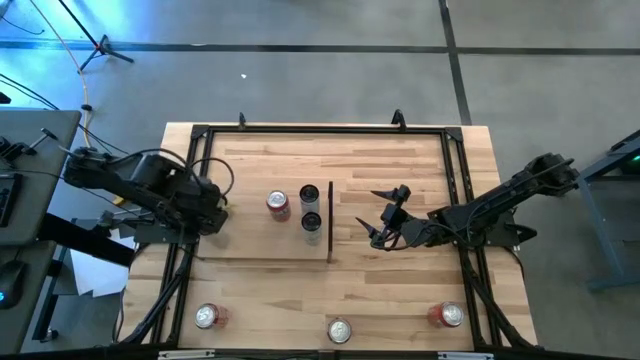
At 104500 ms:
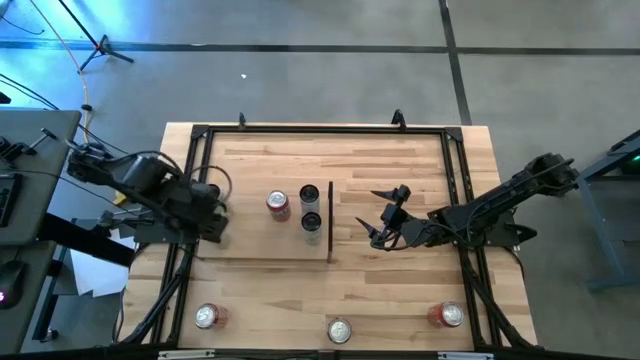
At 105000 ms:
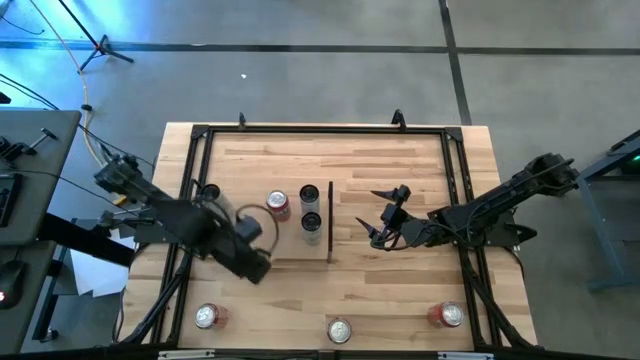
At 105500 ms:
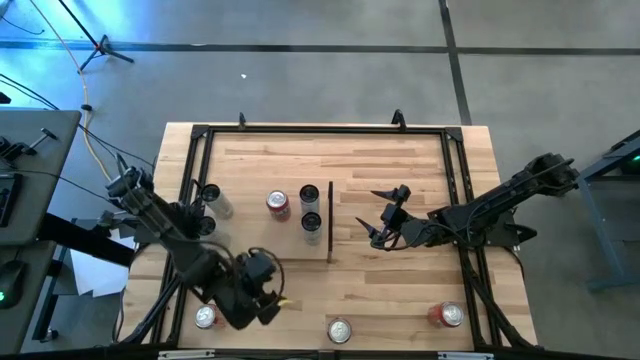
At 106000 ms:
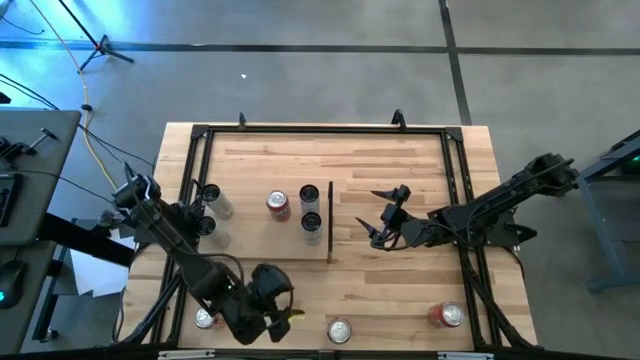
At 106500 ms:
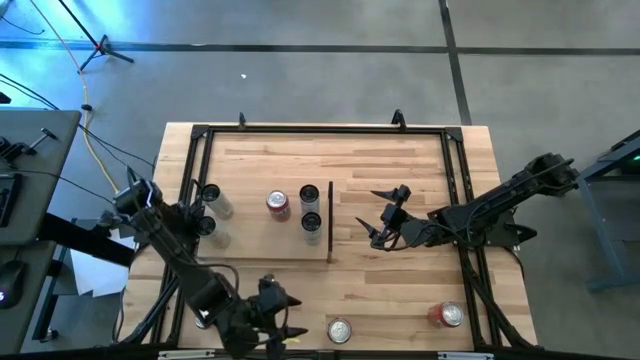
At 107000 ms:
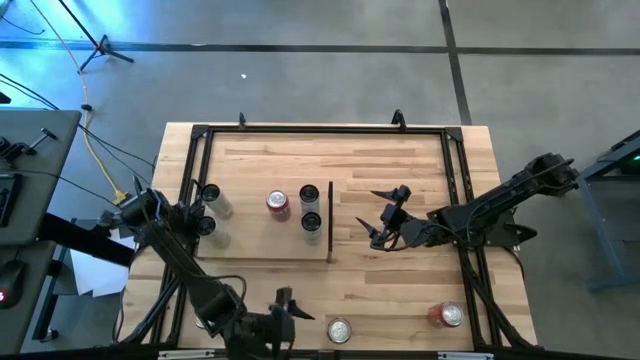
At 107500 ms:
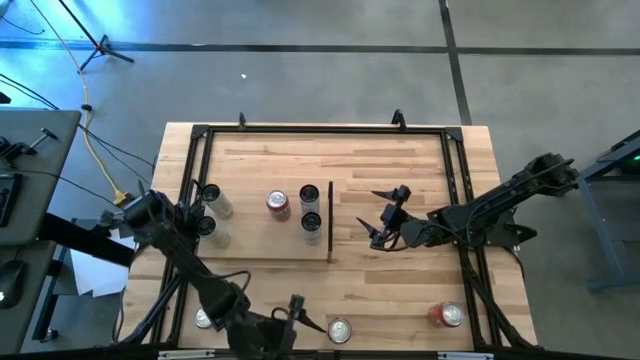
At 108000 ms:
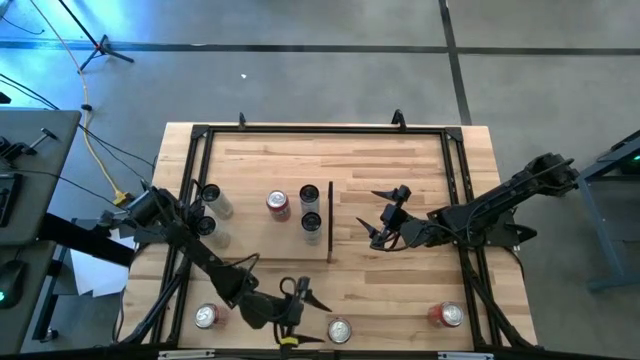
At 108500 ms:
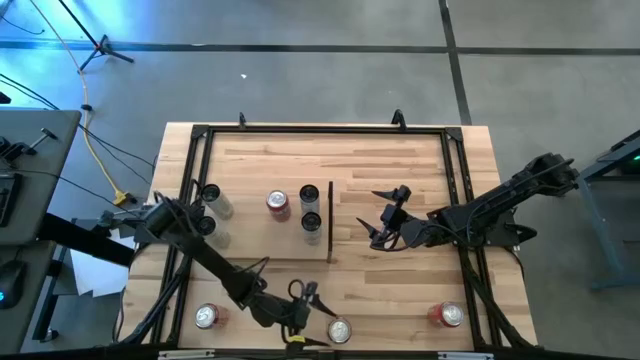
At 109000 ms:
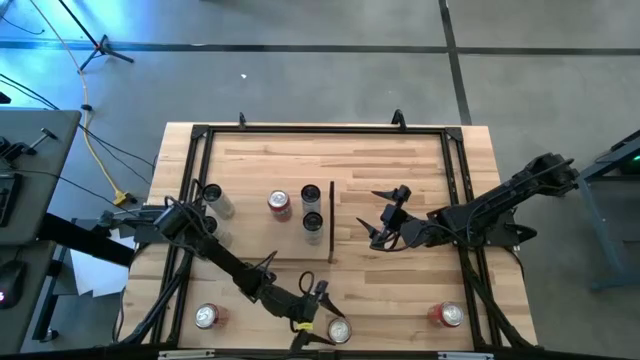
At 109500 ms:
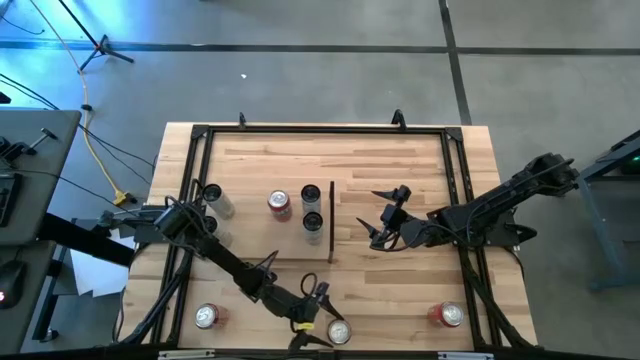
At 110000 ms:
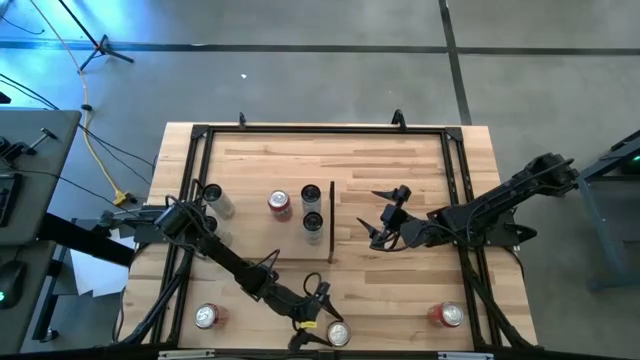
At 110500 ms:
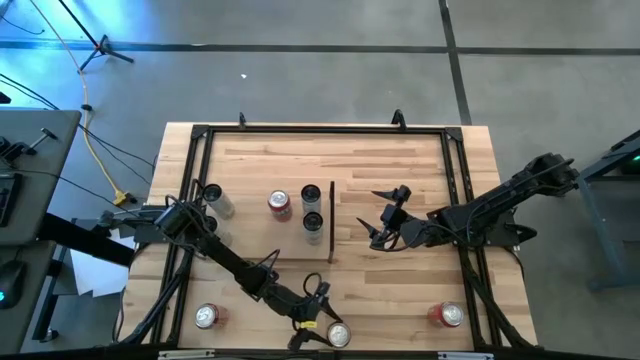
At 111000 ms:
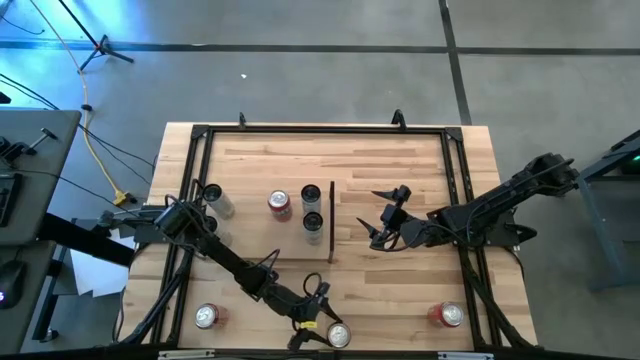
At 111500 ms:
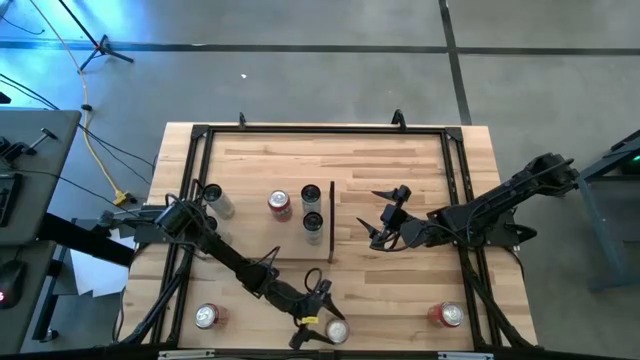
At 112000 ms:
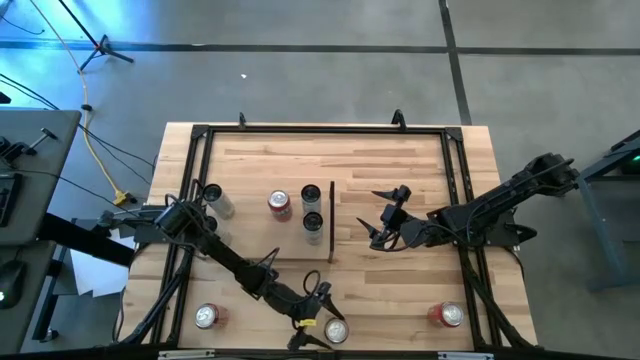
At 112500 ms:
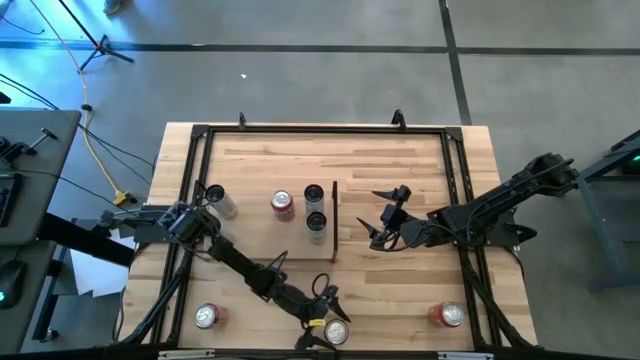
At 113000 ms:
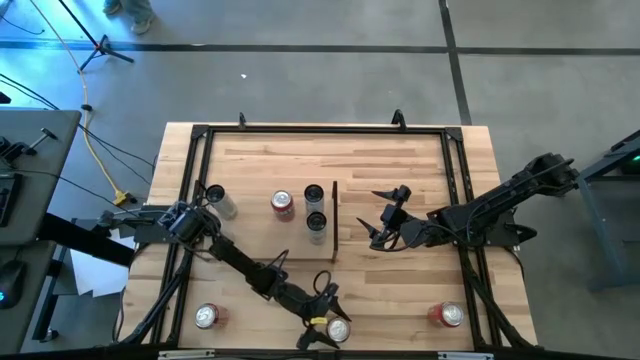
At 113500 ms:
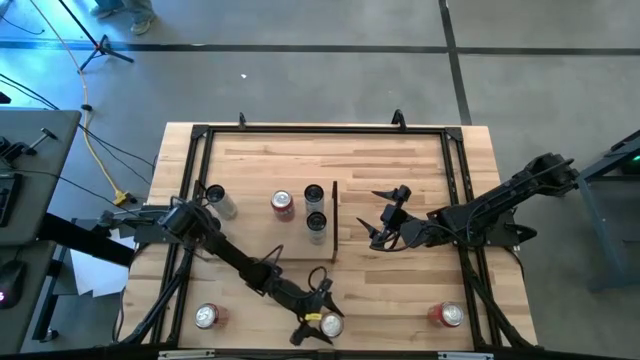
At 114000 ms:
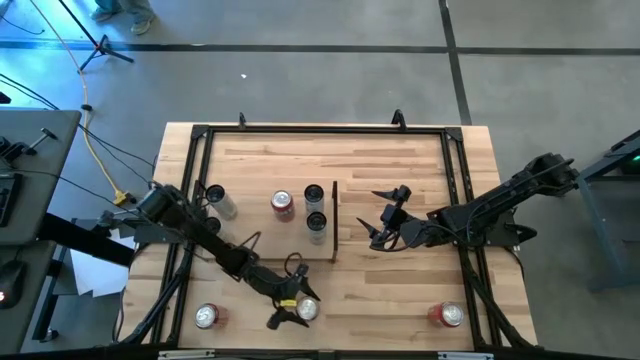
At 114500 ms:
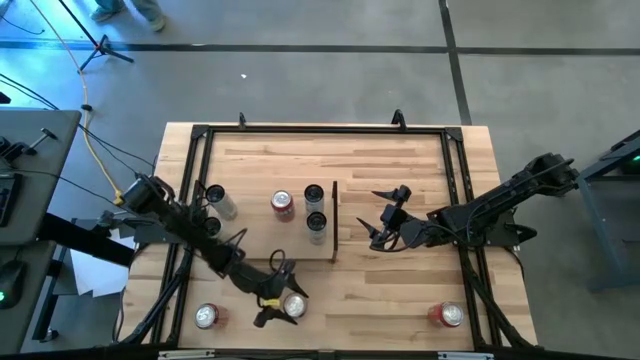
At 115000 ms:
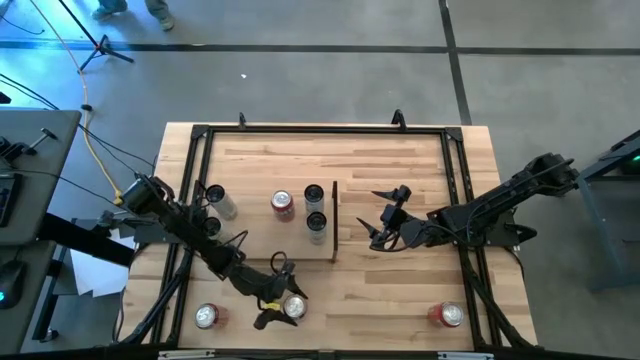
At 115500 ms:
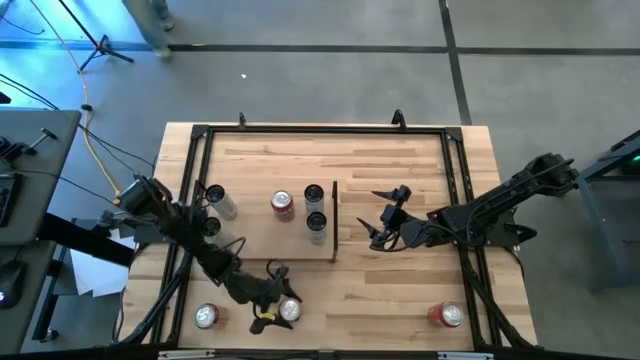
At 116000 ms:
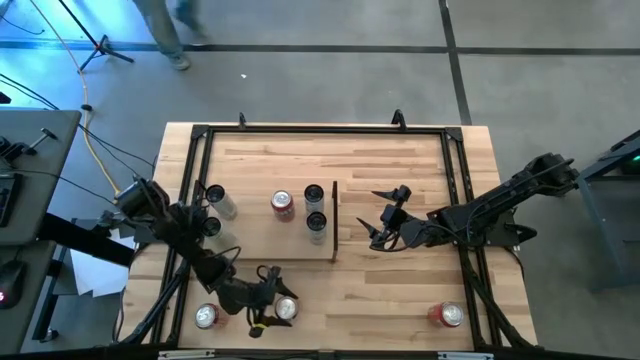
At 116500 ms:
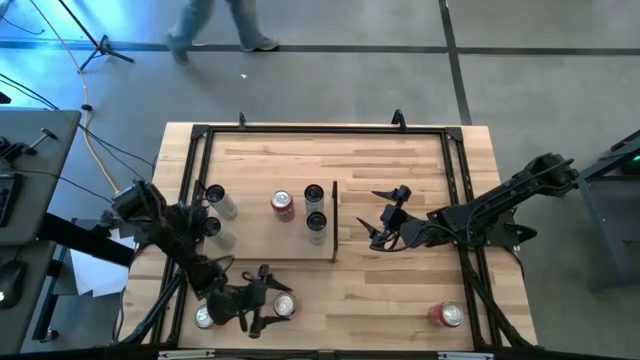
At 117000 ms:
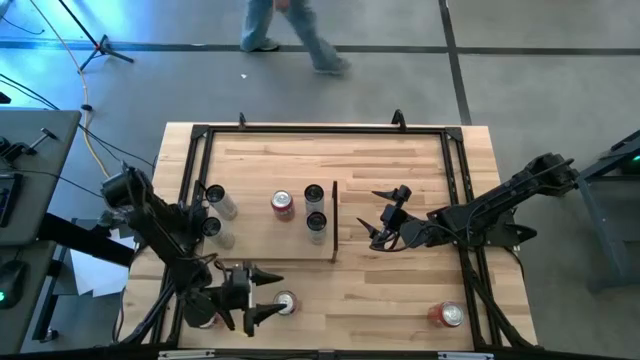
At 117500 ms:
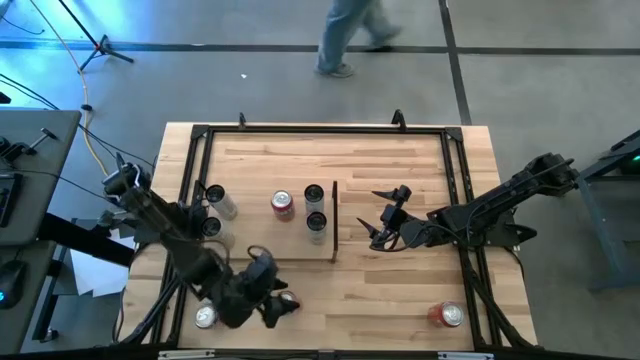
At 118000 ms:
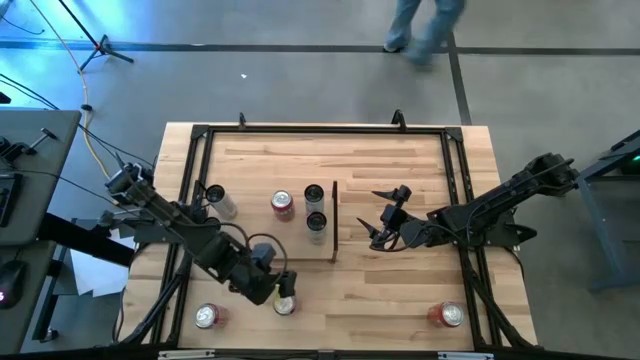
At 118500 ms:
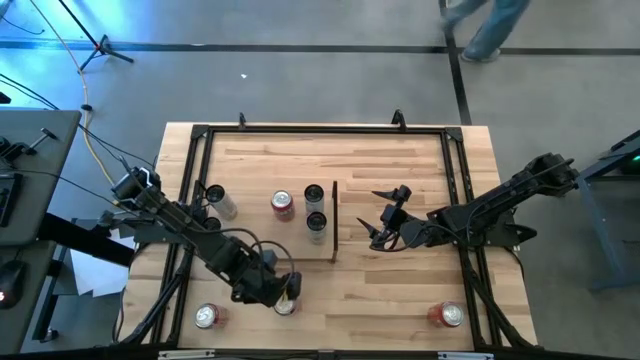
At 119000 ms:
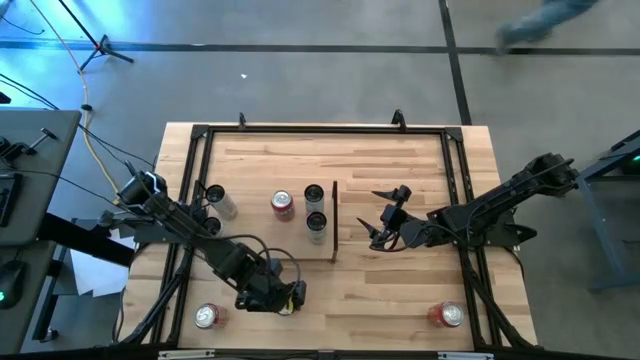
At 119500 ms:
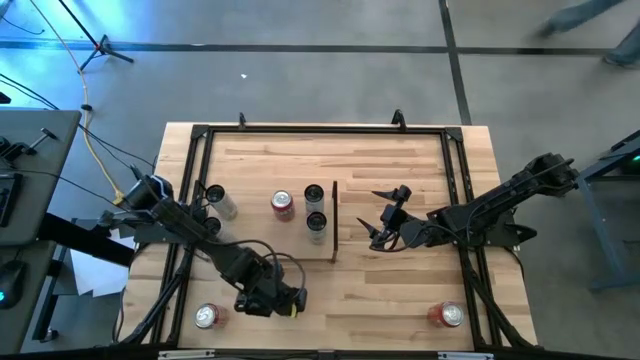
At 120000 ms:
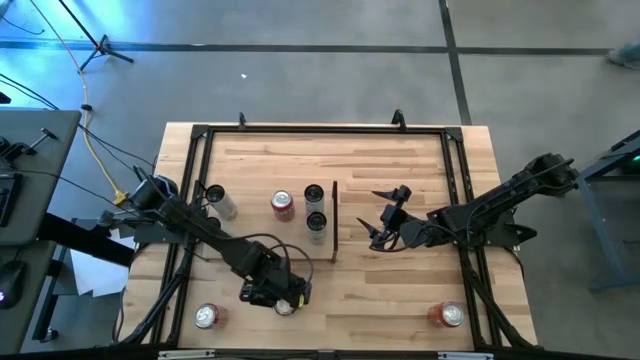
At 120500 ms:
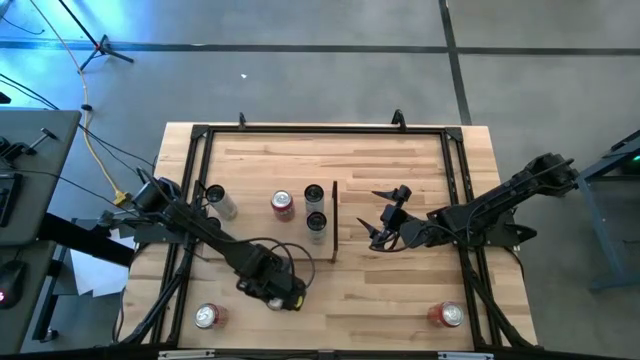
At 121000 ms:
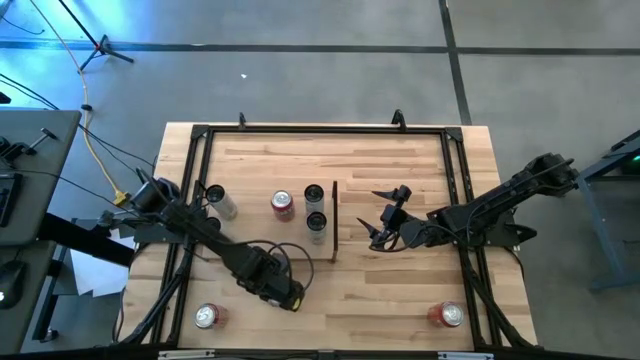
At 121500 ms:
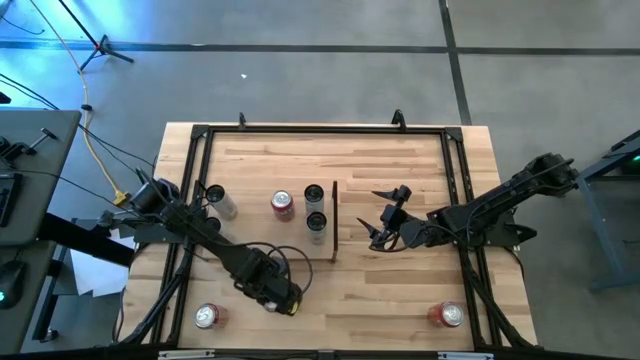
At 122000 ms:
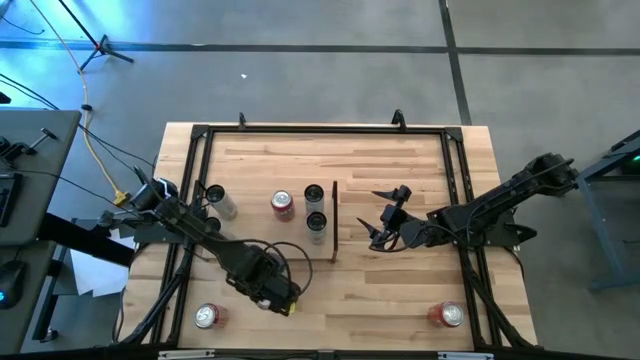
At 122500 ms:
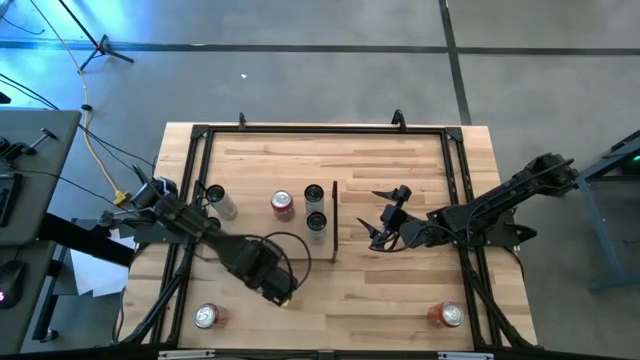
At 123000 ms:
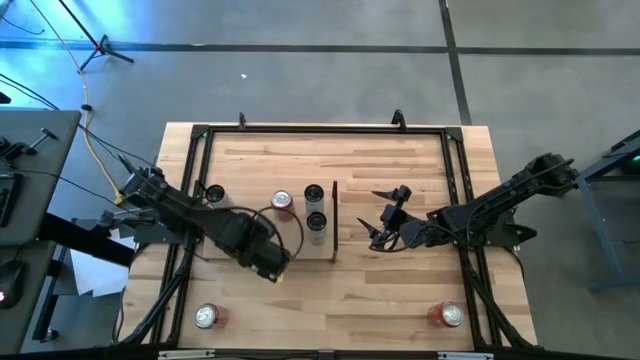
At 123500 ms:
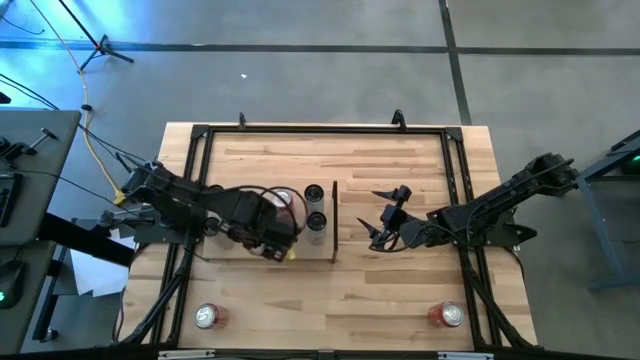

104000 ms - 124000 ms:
Task: Place canned beverage on shelf
Put the right red white soda can on the shelf

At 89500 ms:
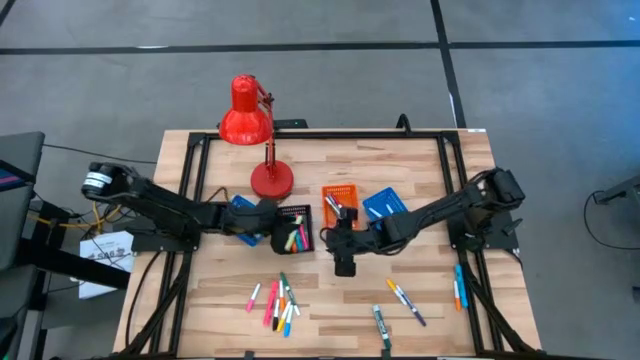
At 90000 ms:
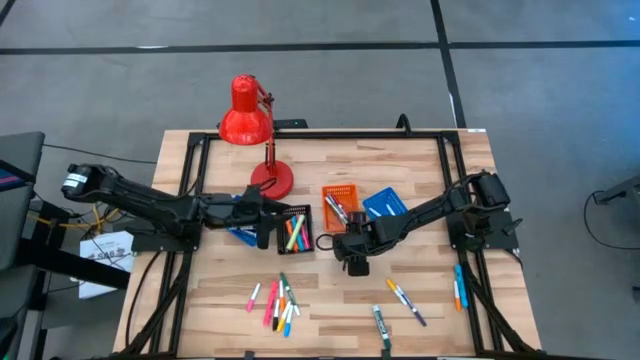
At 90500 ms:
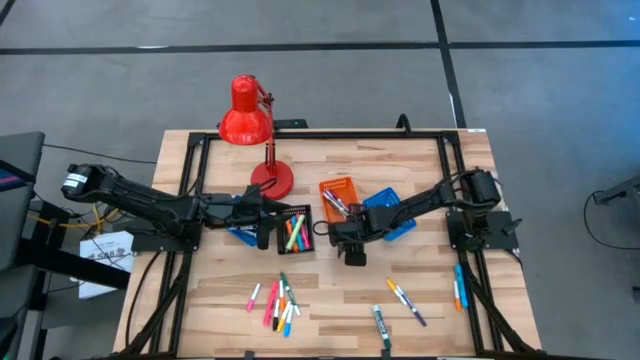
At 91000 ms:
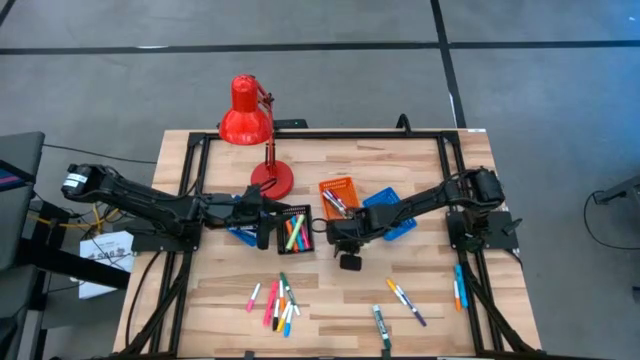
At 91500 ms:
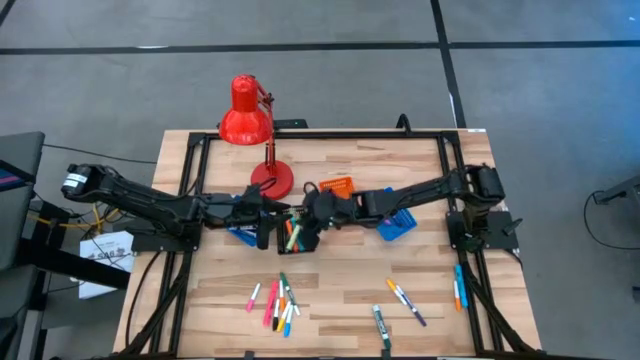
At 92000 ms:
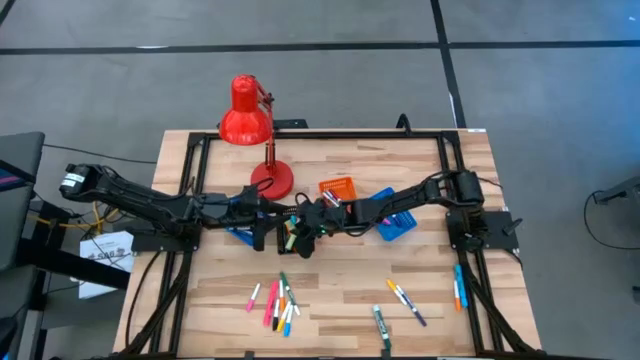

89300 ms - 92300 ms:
Task: Pick & Place Markers
Put the large green highlighter pen into the black basket
